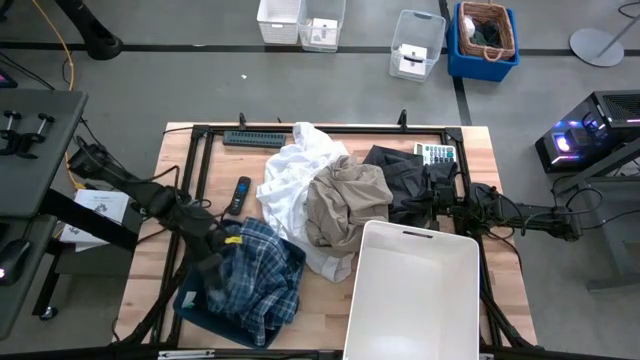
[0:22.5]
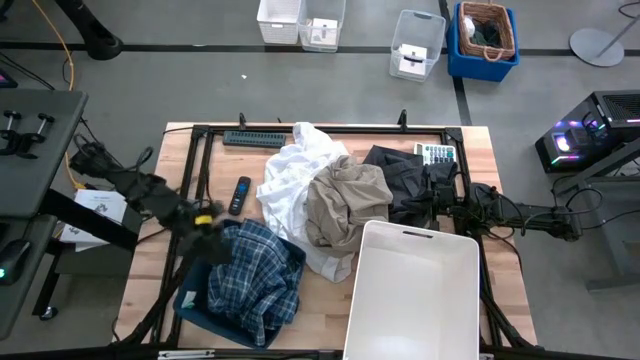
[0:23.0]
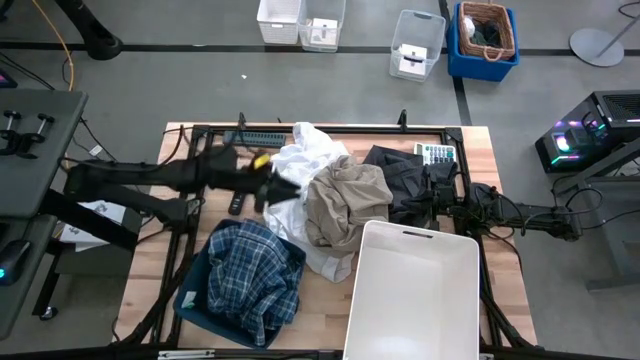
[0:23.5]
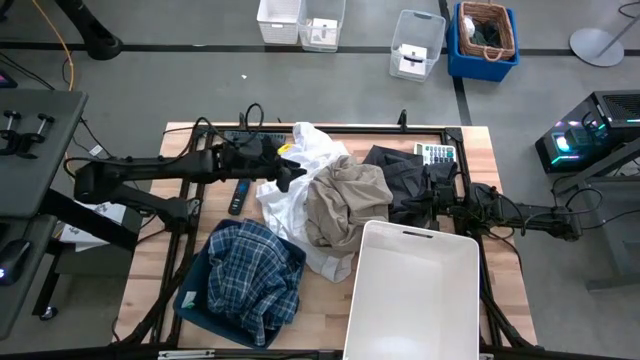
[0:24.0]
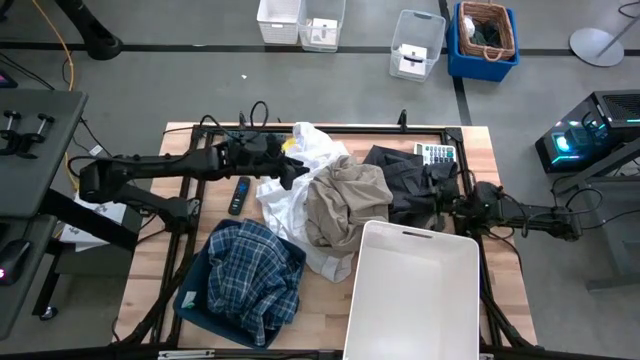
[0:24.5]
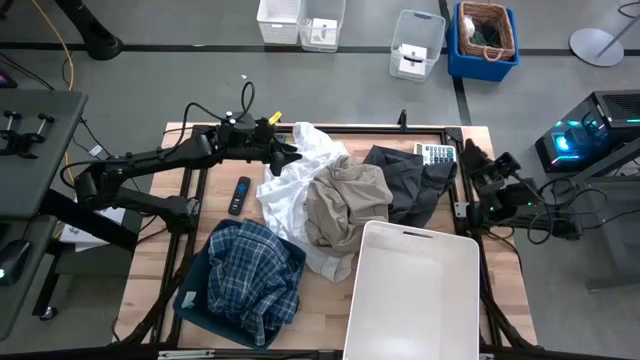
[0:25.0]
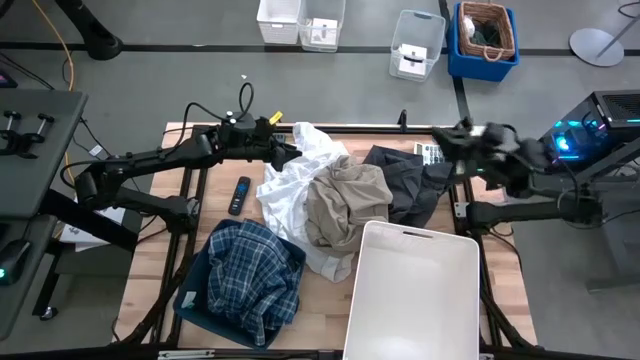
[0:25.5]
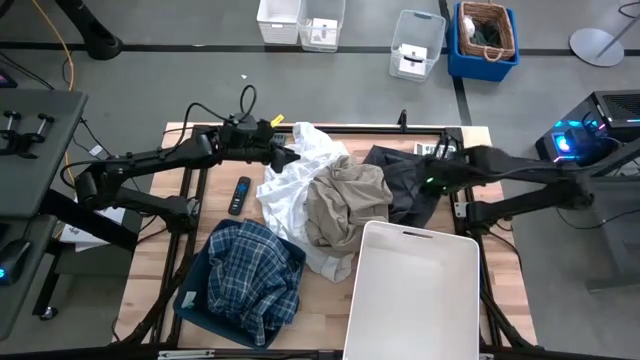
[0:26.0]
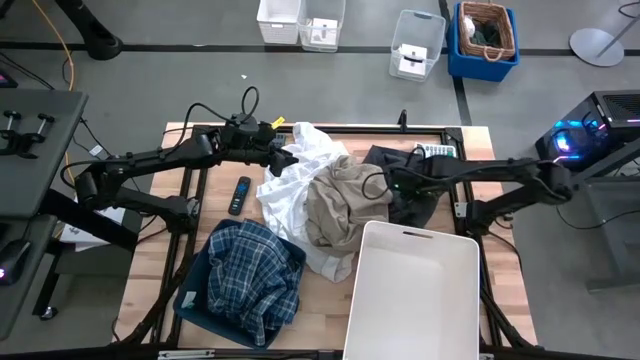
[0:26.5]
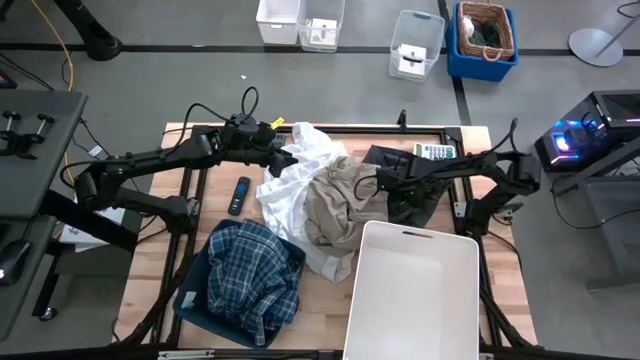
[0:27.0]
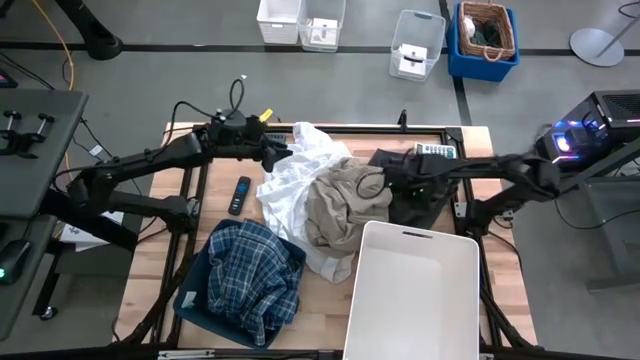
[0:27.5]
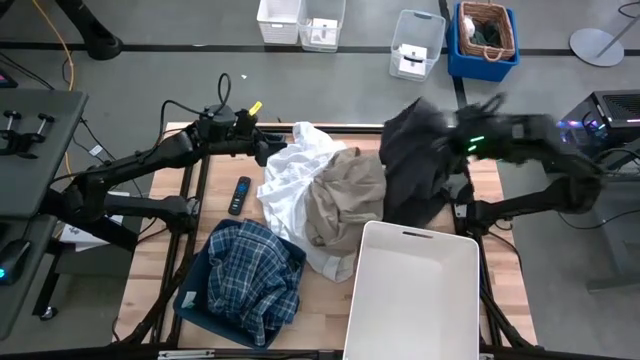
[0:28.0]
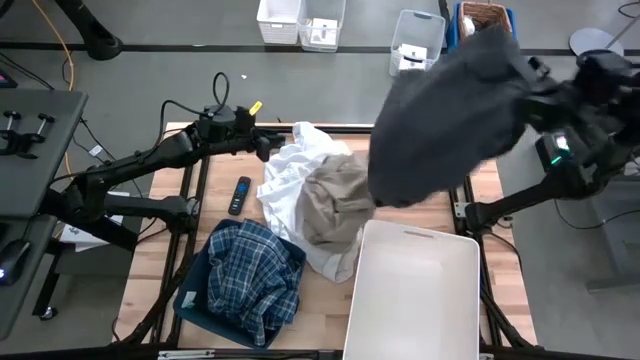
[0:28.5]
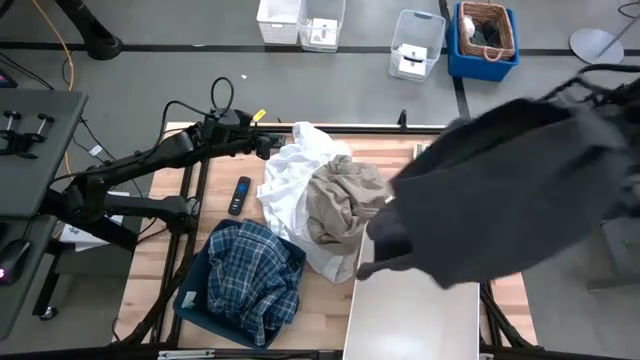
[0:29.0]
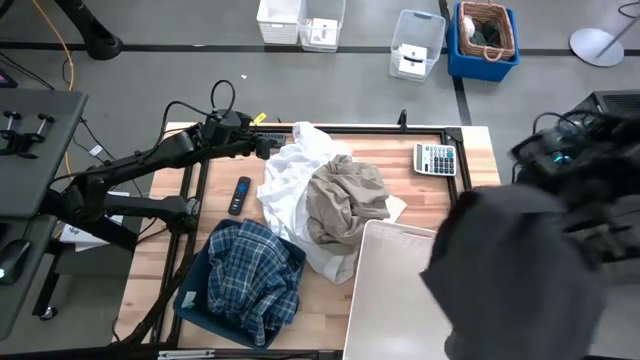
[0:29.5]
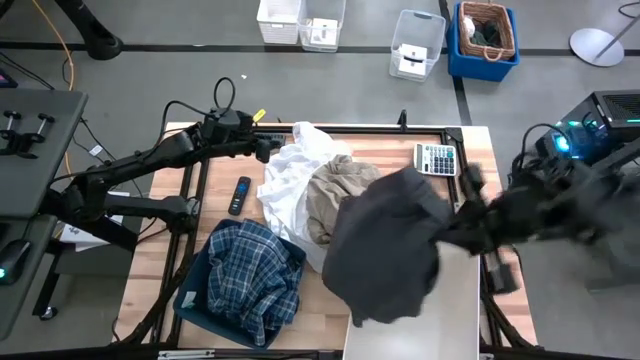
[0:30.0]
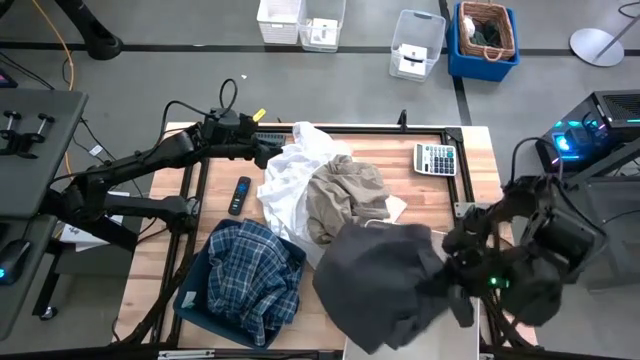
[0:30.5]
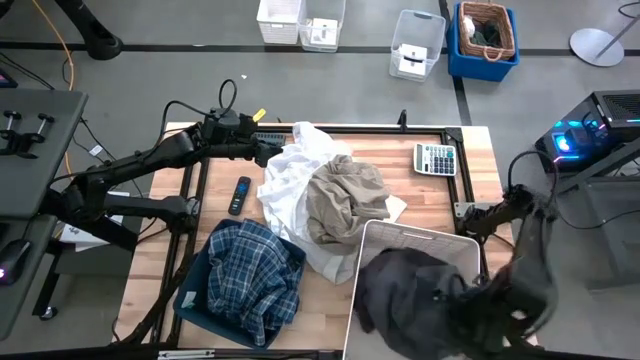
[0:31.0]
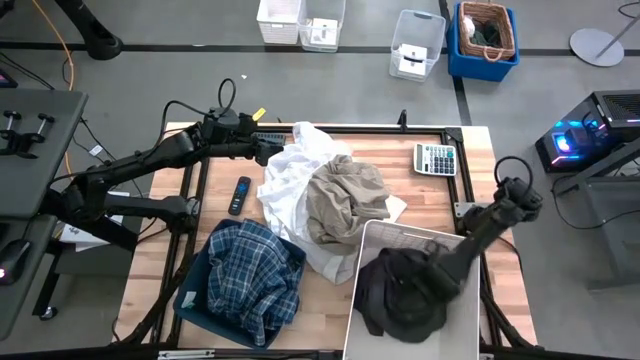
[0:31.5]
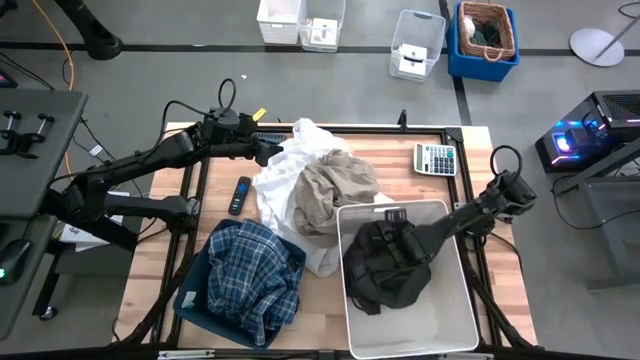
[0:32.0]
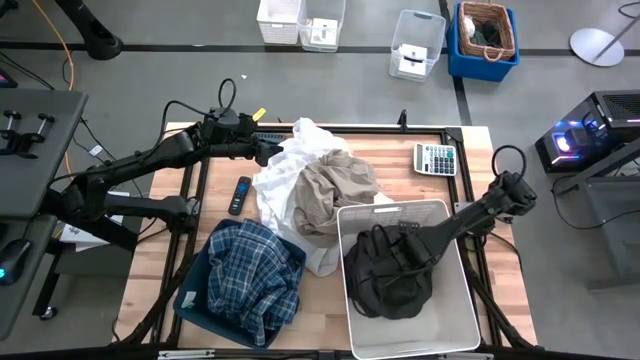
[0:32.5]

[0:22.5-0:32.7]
Task: Sort clothes
Put the gray short into the white laundry organizer

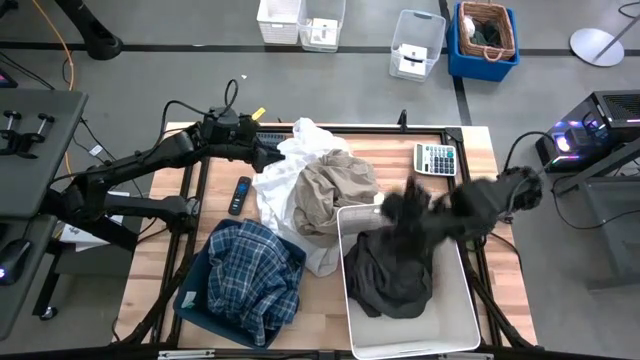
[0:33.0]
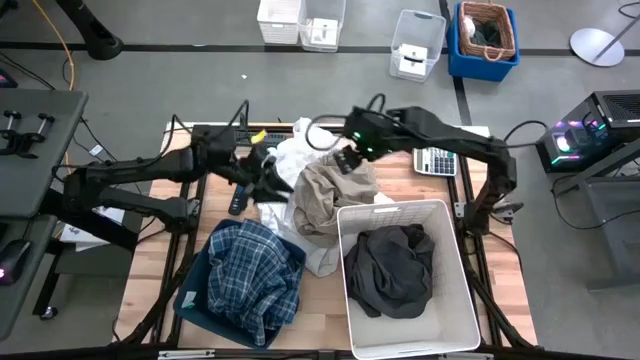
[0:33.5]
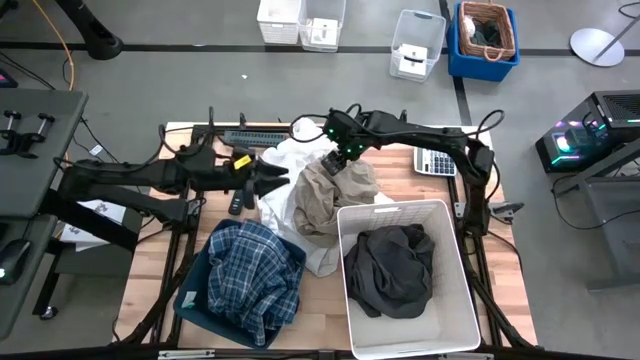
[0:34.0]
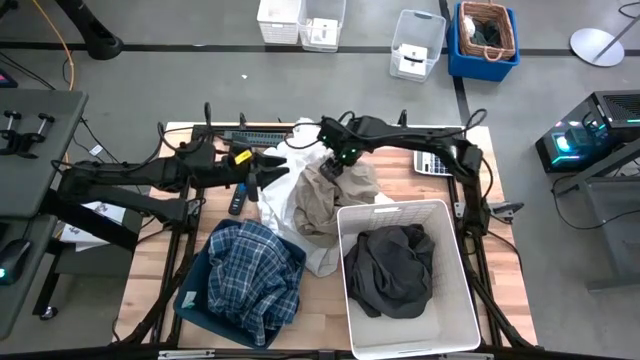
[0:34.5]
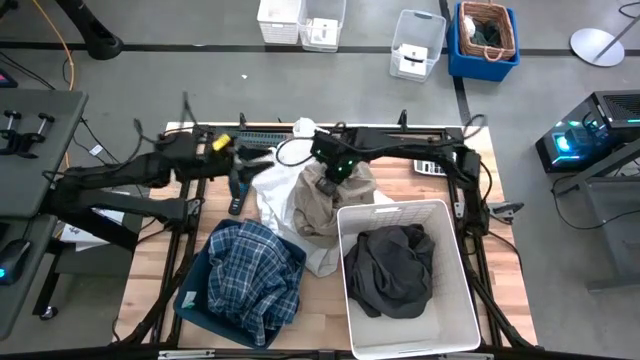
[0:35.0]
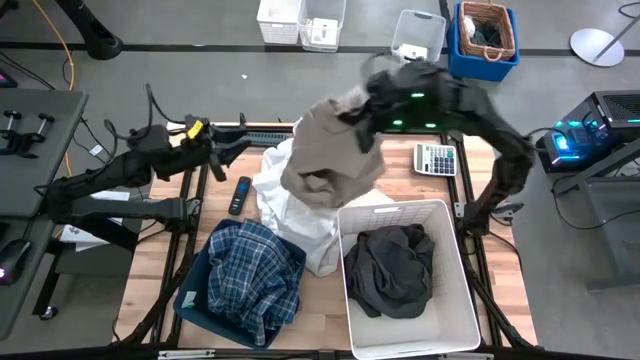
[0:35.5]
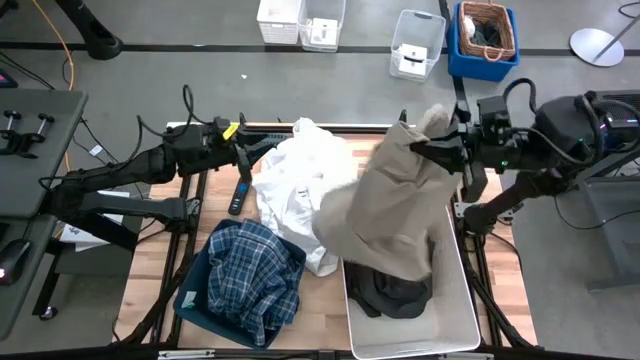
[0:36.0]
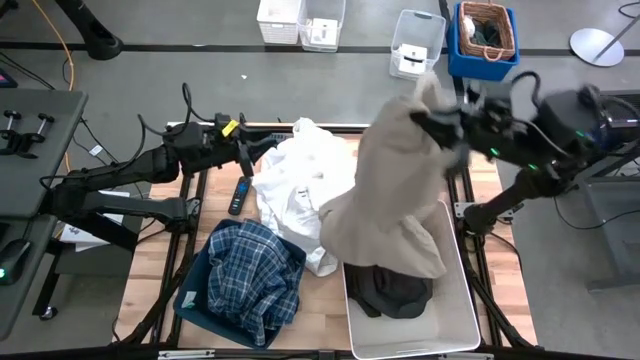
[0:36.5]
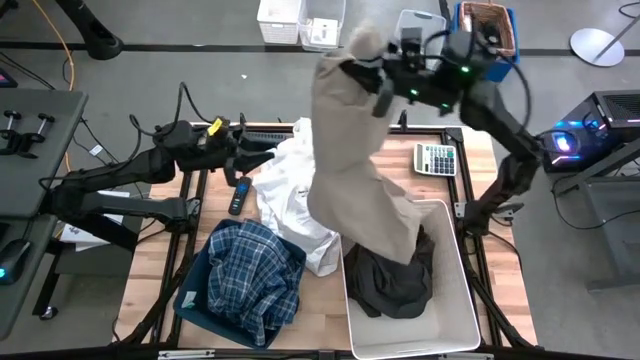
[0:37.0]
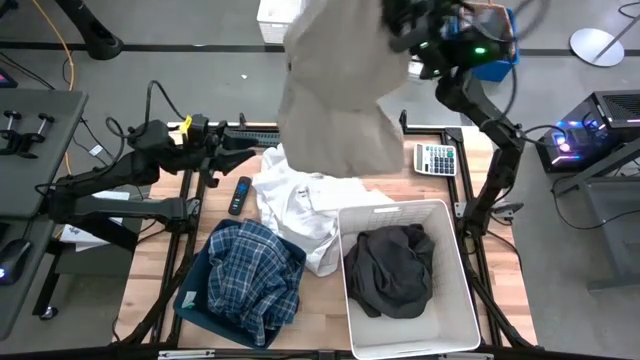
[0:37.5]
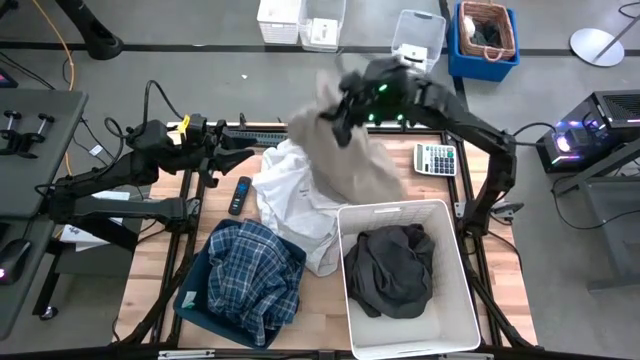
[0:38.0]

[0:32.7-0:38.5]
Adjust the brown short

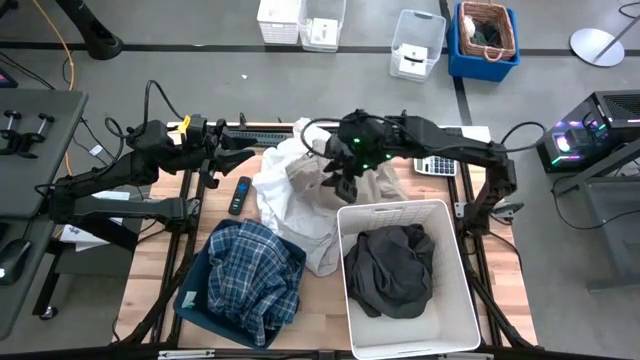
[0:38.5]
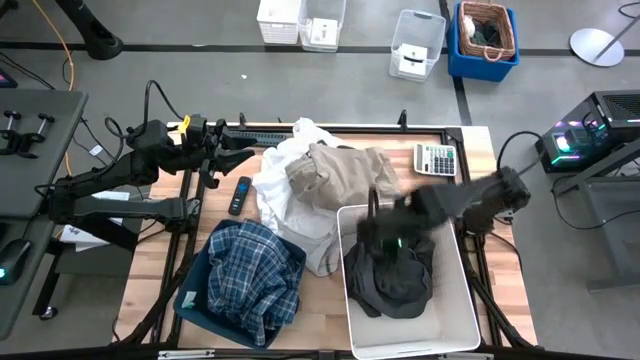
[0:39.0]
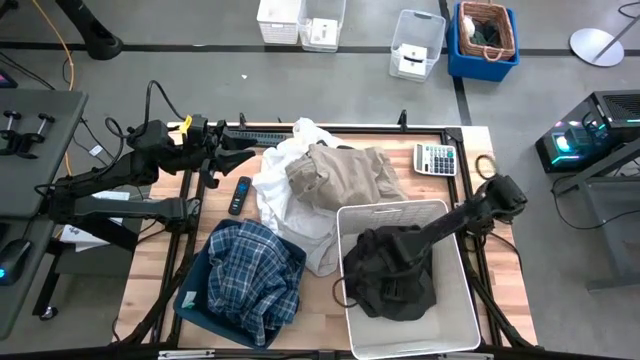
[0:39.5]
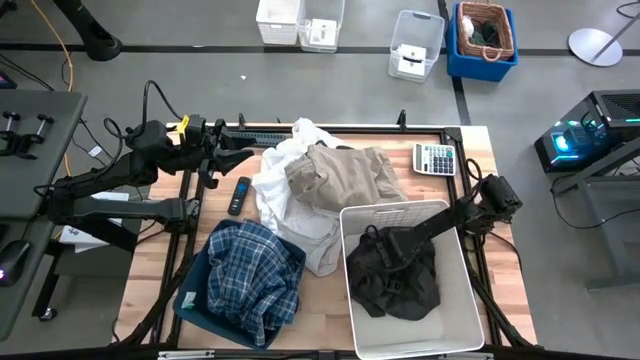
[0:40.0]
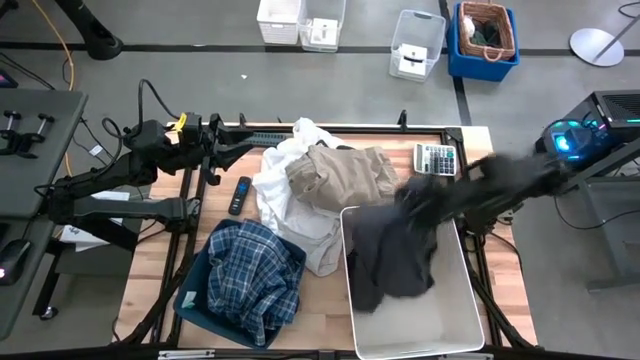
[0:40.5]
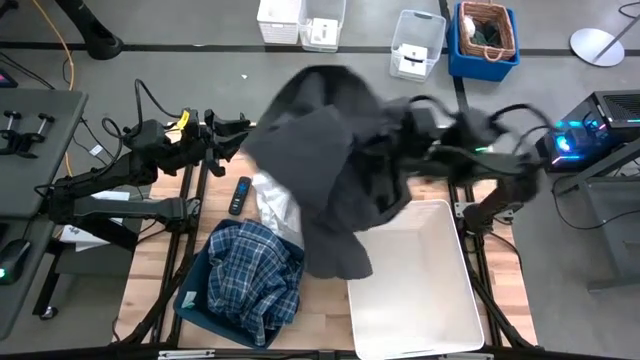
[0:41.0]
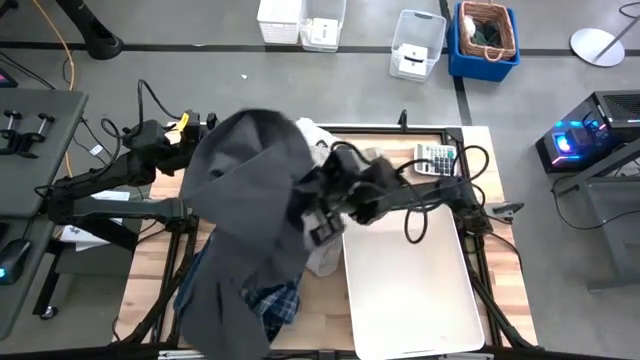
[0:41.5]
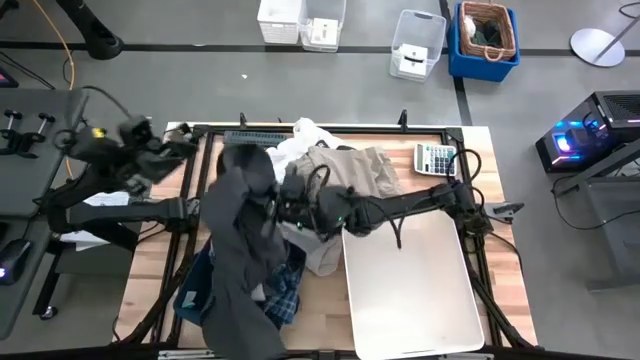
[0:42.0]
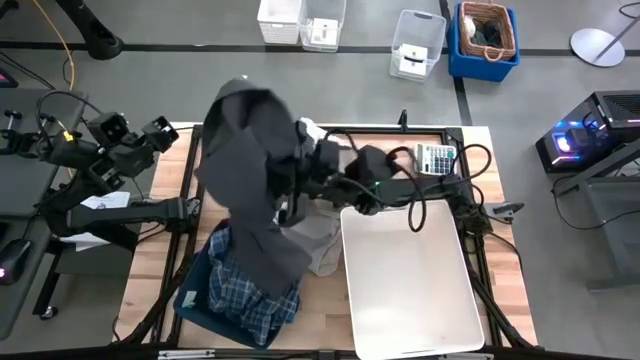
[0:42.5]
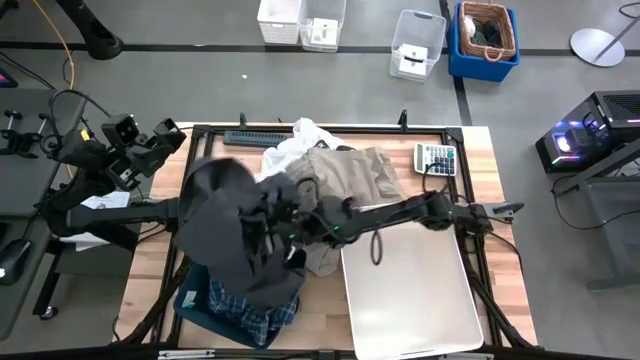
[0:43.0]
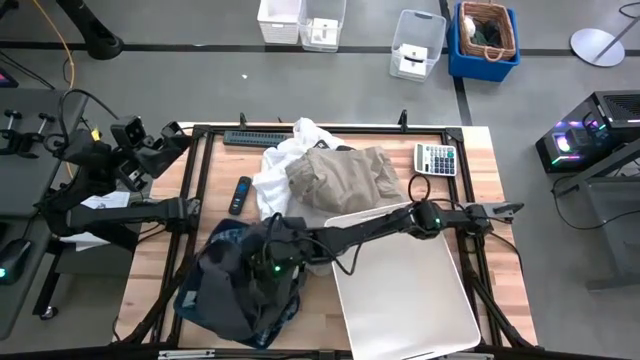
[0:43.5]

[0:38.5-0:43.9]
Put the gray short into the blue laundry organizer
